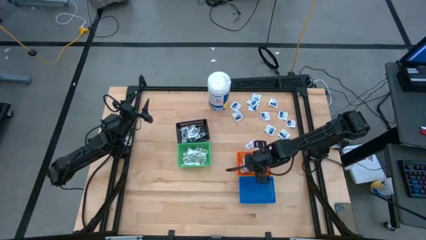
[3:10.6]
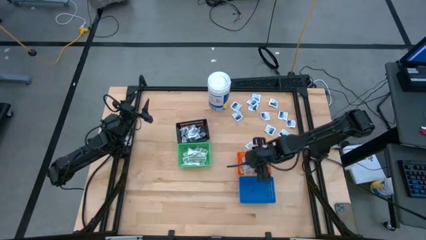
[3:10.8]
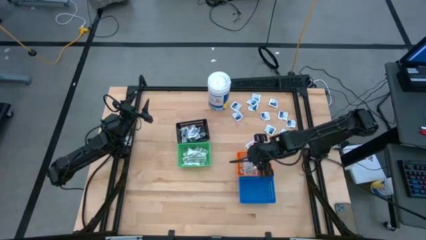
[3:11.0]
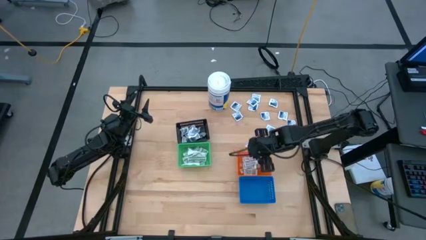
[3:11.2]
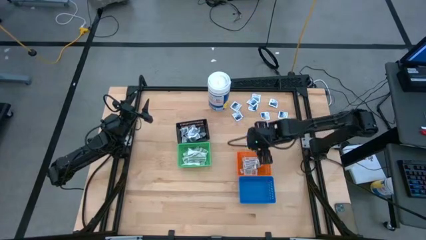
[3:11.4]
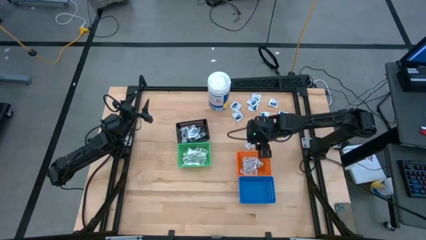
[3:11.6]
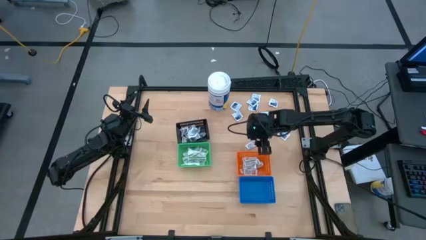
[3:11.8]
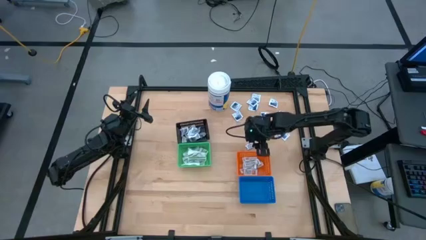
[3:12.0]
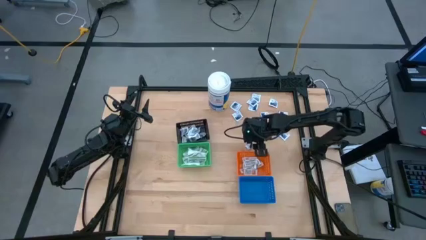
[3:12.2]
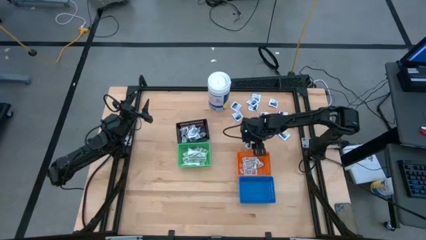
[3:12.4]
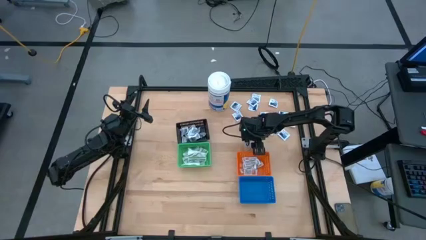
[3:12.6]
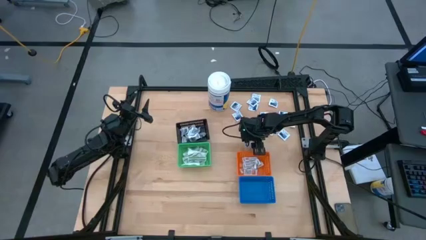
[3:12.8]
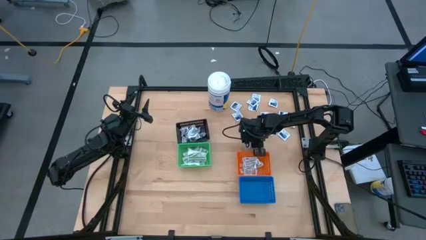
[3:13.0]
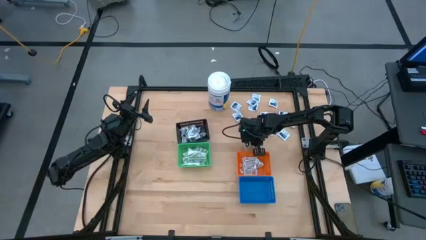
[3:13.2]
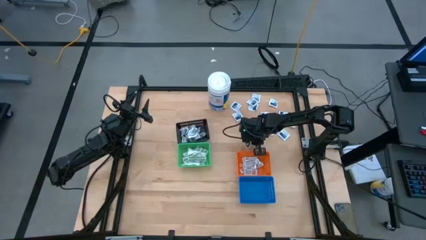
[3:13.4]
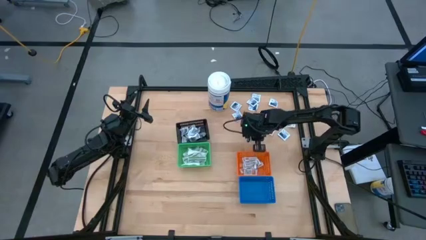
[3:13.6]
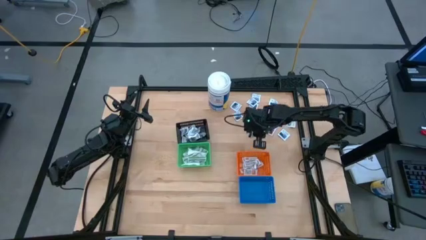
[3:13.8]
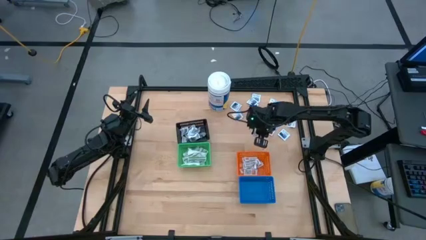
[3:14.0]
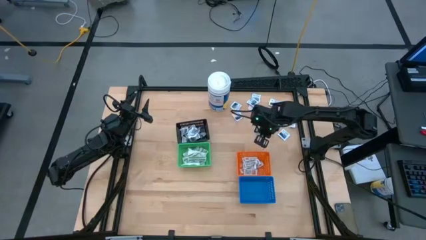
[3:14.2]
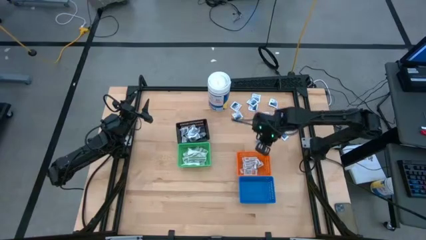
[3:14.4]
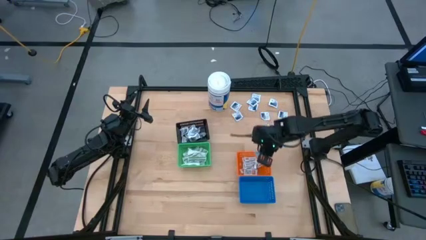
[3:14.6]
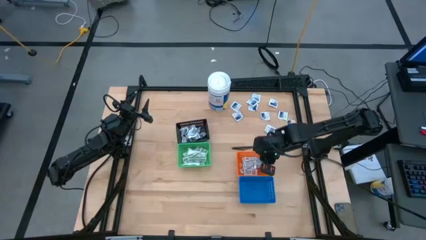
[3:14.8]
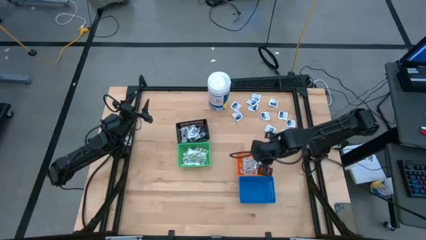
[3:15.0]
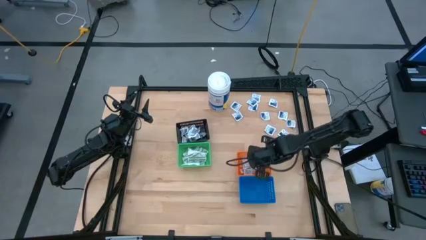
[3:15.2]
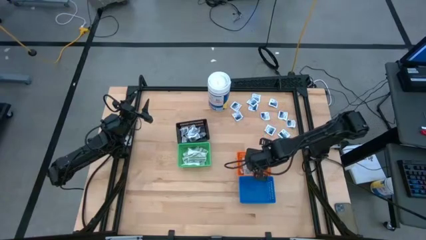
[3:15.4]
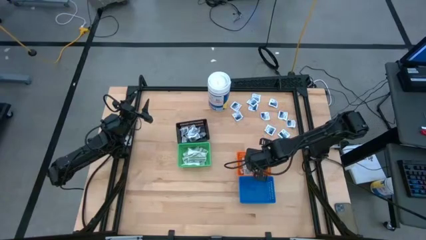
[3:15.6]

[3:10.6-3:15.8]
Task: Pick & Place First Aid Supplies
Put the orange pad into the orange bin

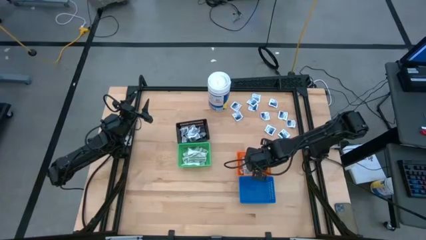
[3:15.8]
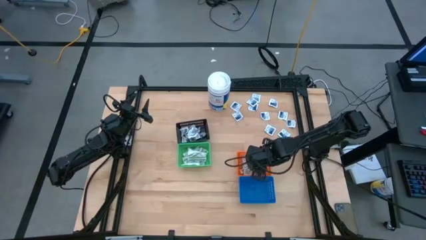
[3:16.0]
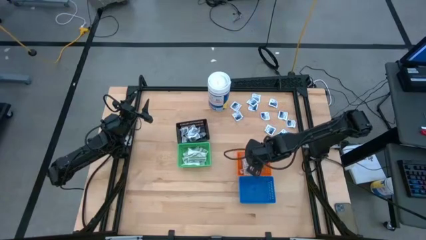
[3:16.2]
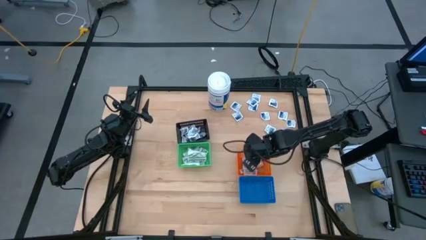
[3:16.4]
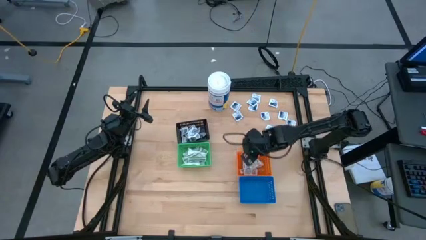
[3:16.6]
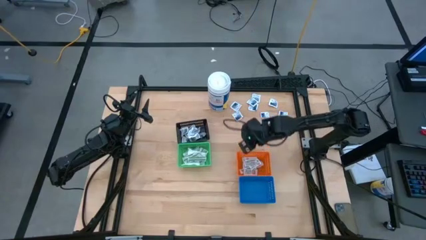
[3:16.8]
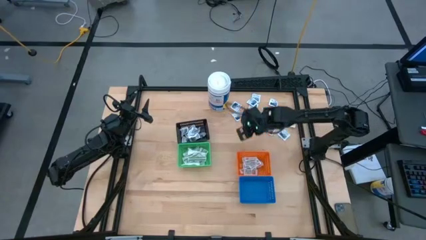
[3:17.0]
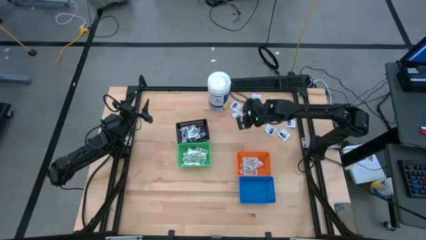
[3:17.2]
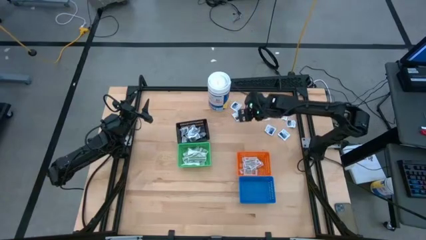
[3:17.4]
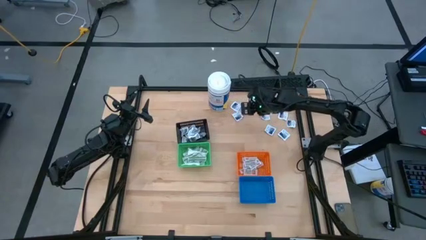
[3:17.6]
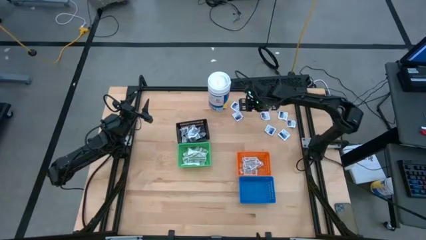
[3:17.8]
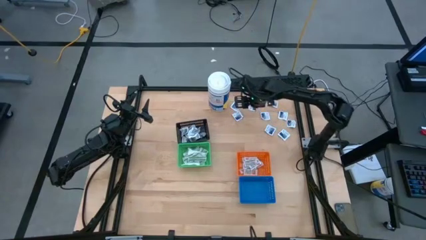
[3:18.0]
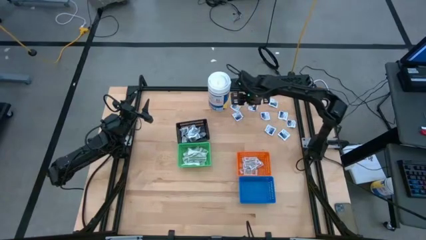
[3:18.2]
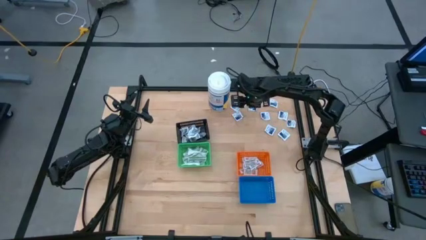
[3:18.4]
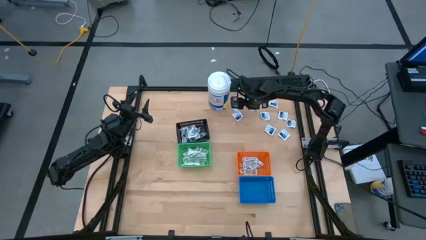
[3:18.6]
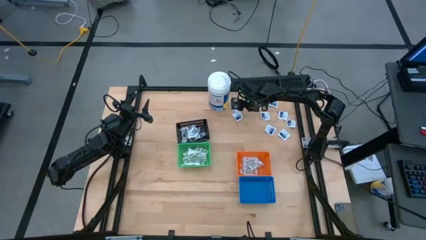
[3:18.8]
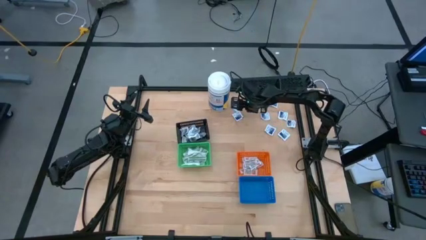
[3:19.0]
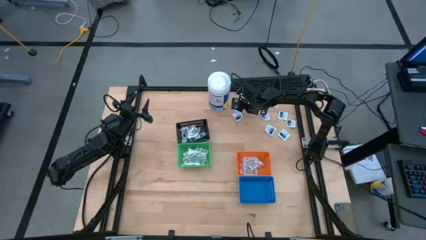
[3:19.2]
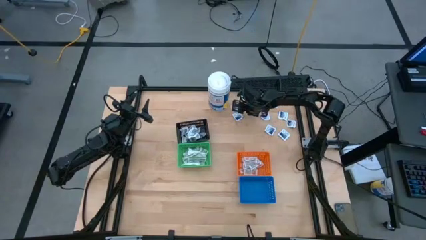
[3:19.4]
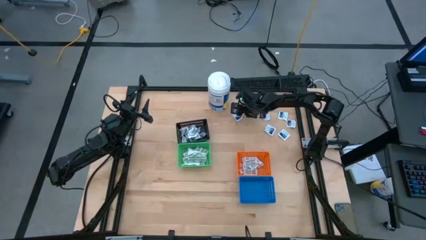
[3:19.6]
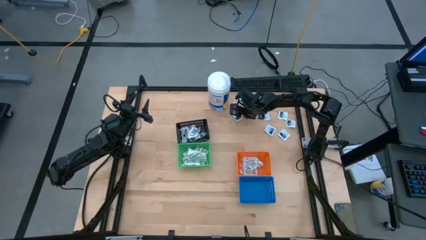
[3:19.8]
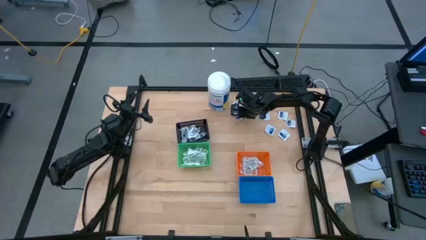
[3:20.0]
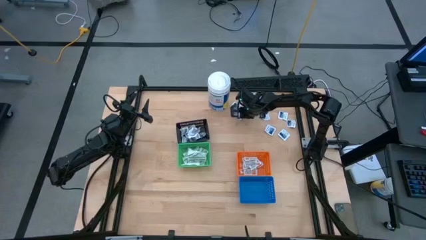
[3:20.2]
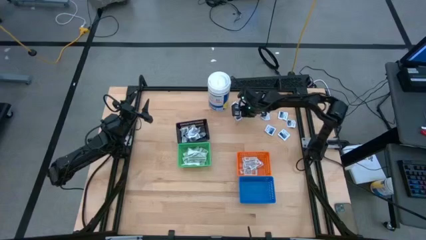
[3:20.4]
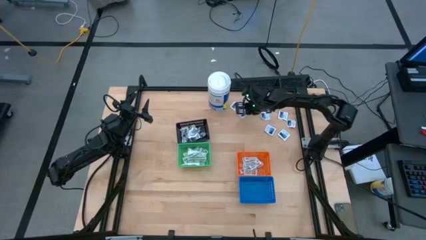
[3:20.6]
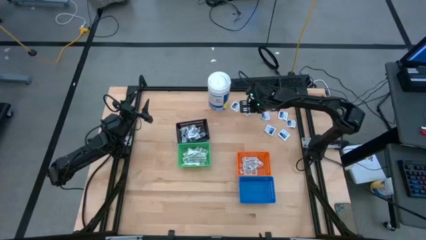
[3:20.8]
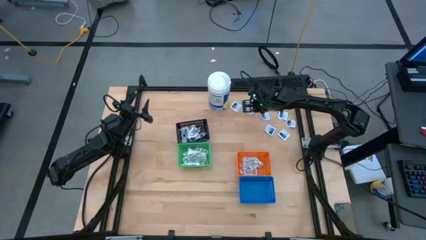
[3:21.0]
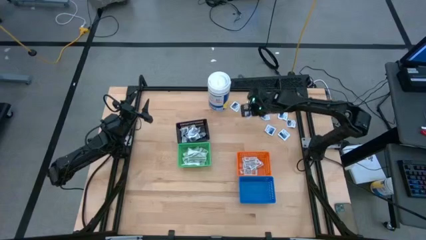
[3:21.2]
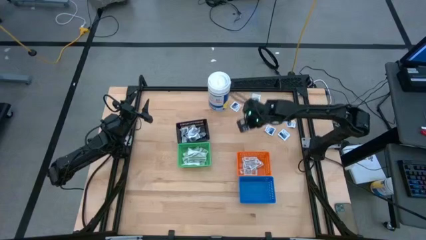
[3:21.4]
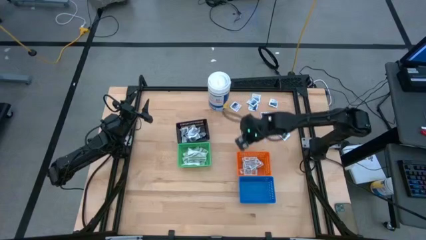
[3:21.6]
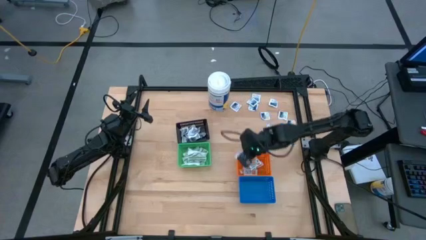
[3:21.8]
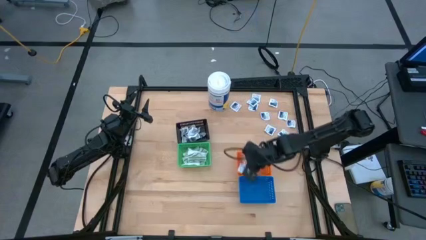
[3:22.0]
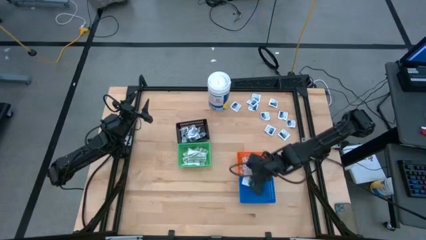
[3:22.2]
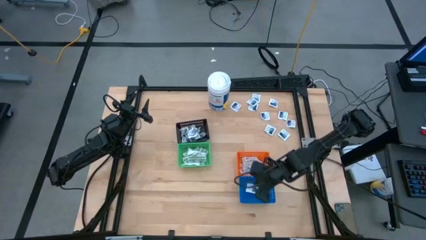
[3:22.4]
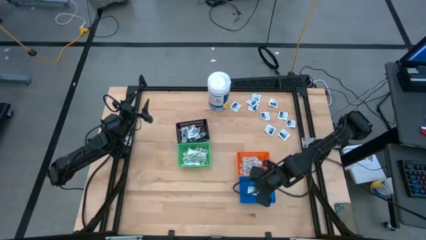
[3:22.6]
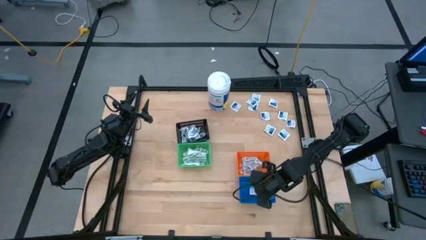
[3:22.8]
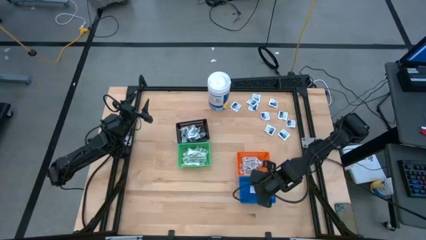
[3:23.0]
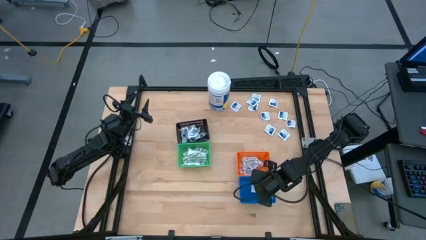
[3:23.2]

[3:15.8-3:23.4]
Put the blue pad into the blue bin

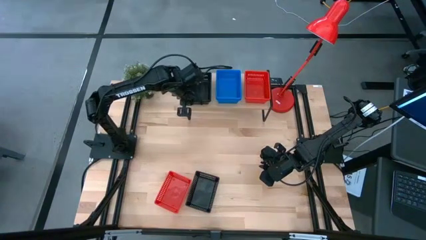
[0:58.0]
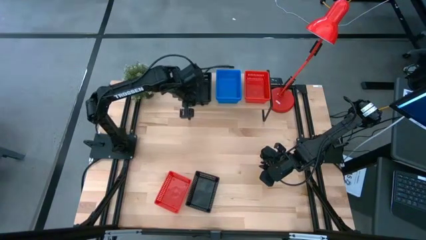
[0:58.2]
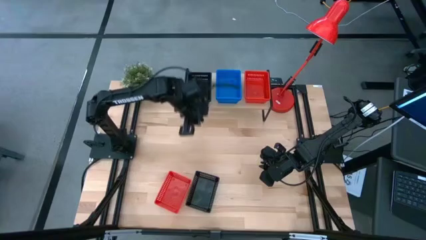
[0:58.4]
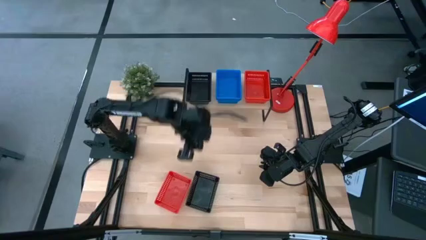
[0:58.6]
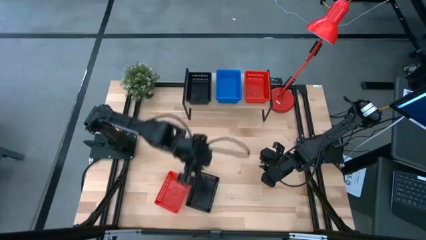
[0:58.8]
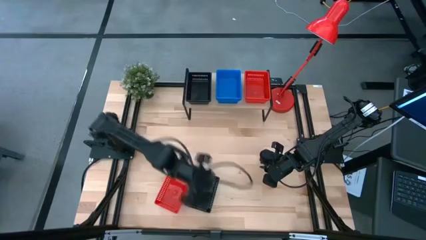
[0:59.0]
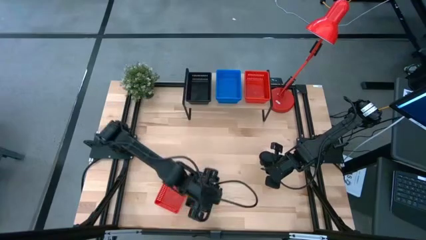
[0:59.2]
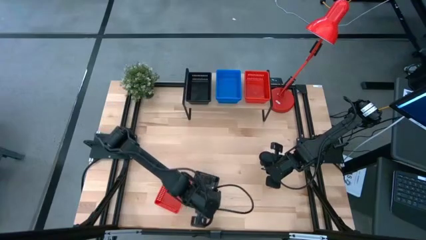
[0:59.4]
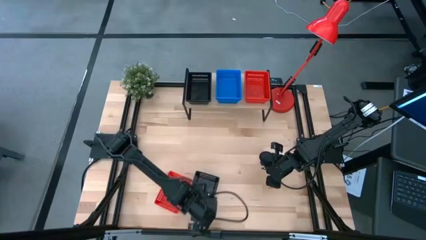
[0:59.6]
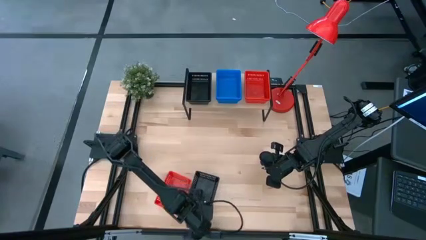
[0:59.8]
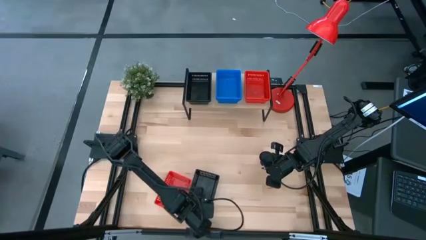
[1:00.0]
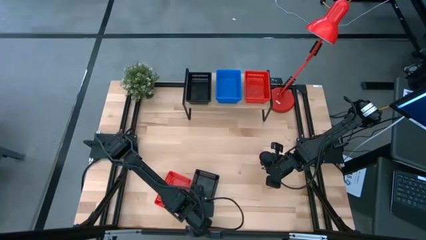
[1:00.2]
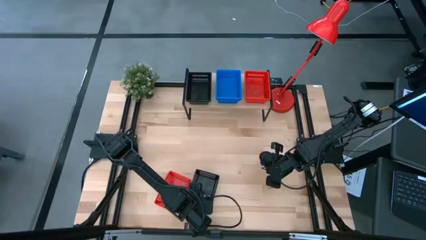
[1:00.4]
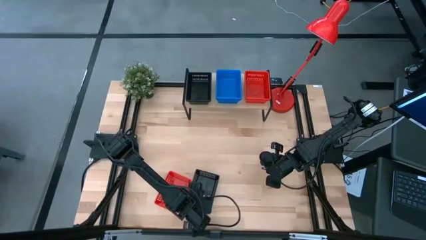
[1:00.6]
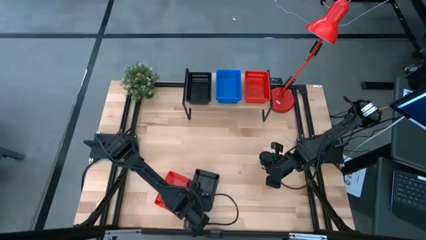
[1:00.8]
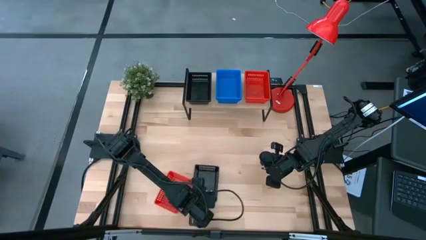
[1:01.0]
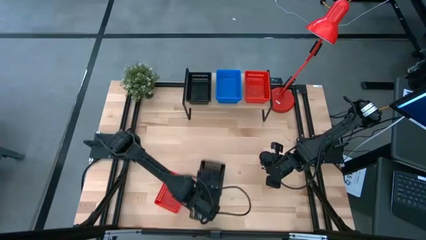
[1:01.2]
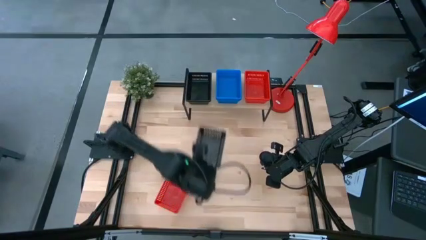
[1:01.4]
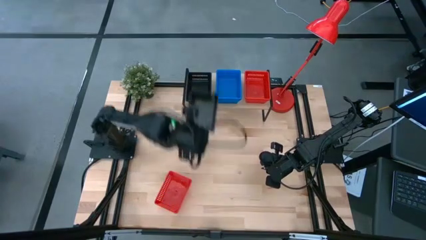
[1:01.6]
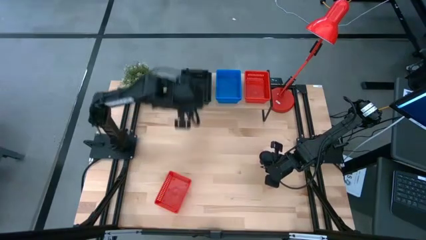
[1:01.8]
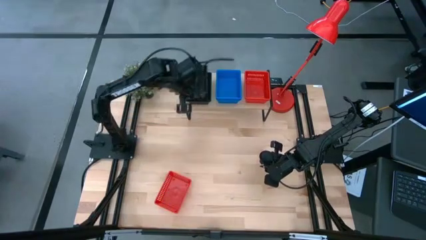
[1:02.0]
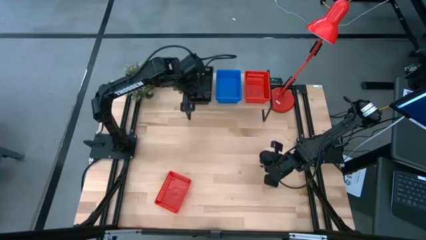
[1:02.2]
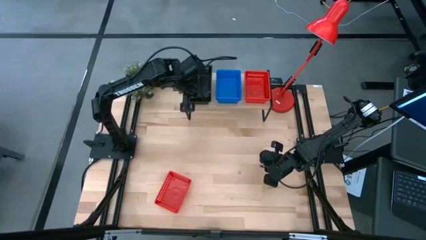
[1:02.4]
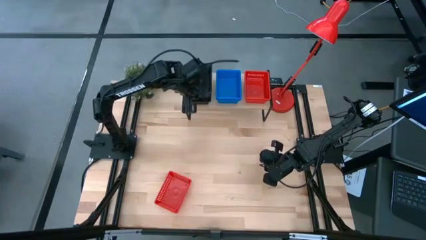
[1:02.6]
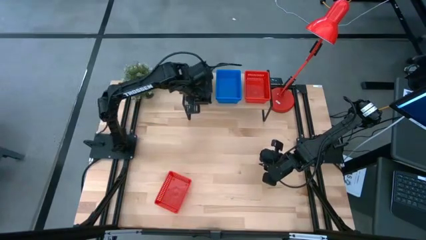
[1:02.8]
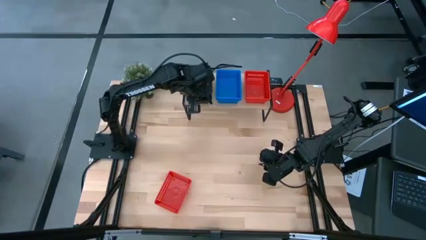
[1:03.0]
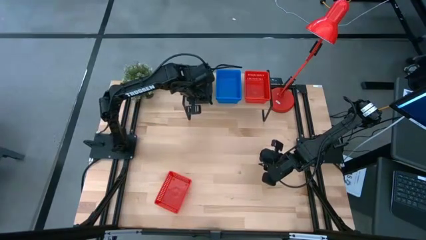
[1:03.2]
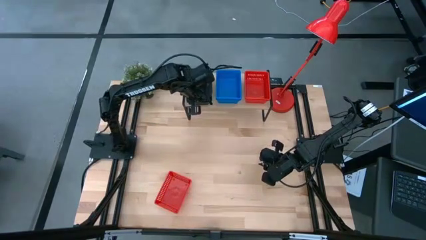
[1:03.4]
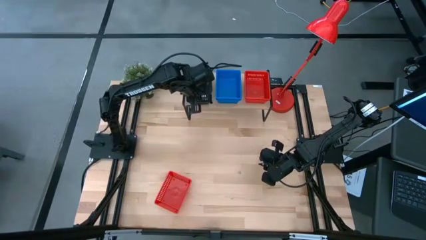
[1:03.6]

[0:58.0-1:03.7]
Task: Stack baskets on shelf by color
Stack the black basket on top of the stacked black basket on the shelf
